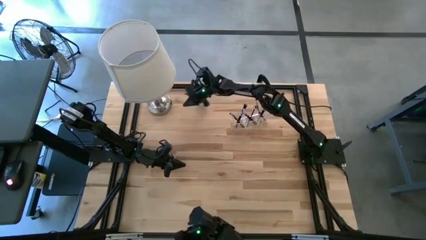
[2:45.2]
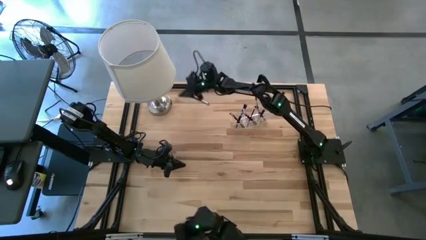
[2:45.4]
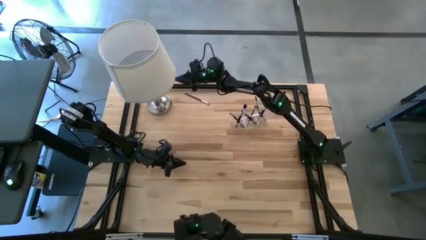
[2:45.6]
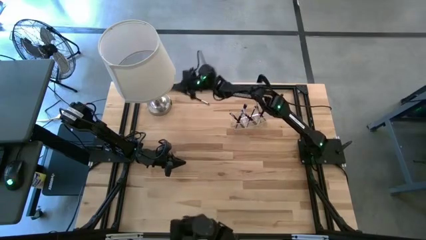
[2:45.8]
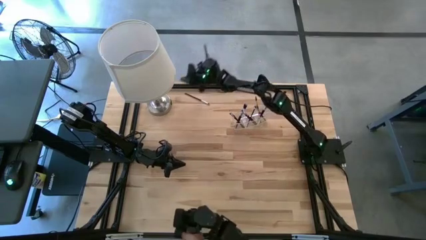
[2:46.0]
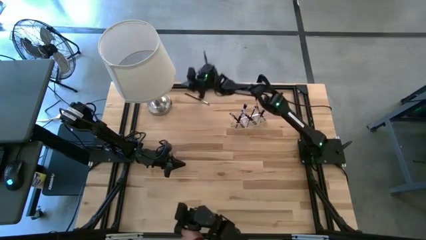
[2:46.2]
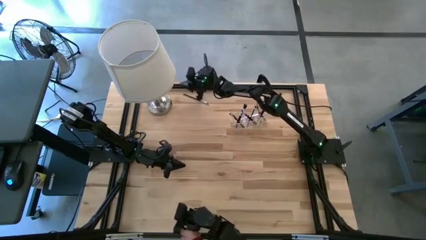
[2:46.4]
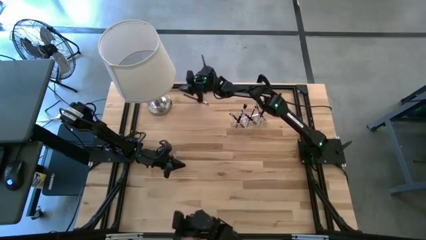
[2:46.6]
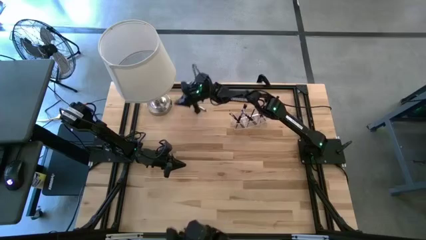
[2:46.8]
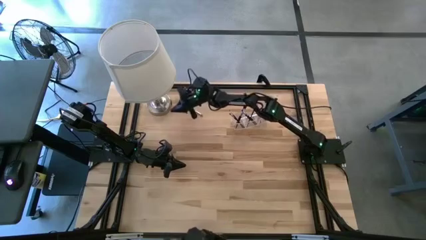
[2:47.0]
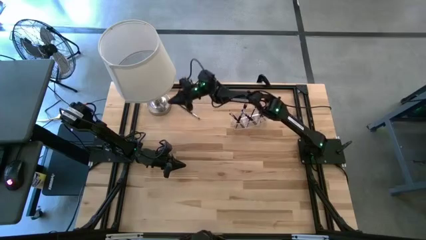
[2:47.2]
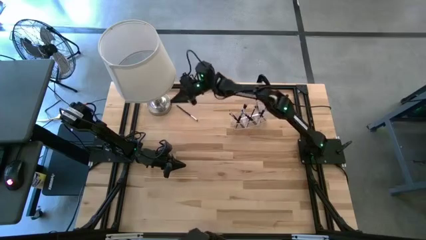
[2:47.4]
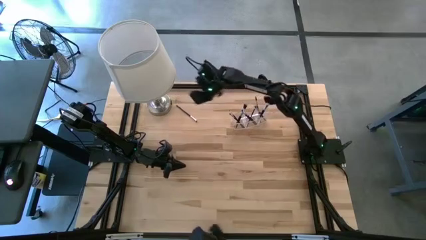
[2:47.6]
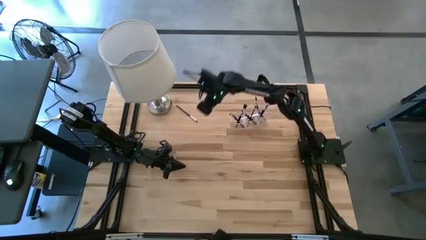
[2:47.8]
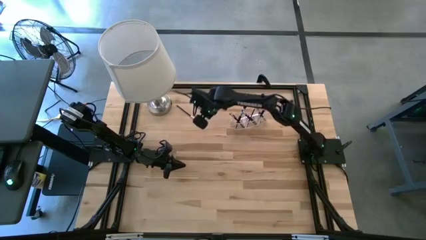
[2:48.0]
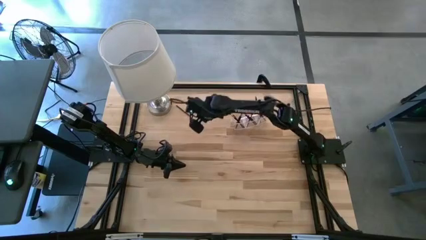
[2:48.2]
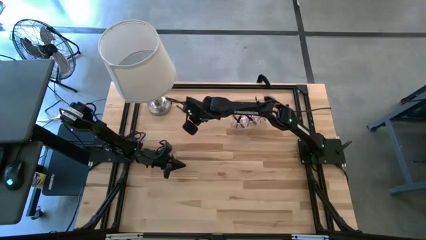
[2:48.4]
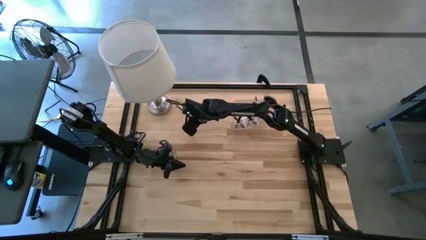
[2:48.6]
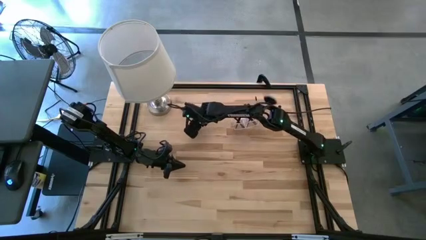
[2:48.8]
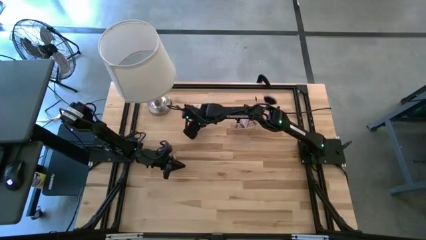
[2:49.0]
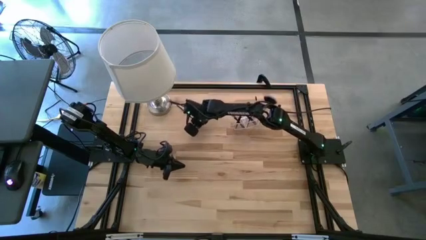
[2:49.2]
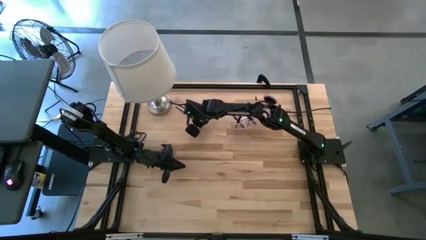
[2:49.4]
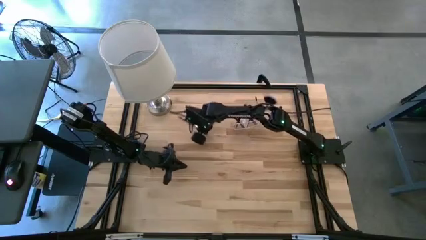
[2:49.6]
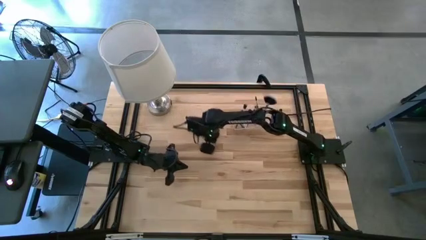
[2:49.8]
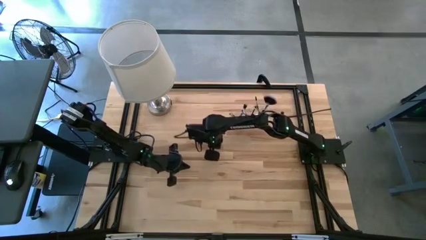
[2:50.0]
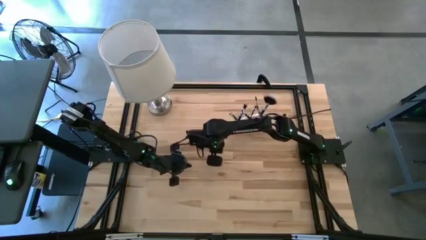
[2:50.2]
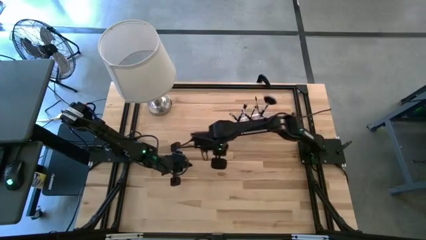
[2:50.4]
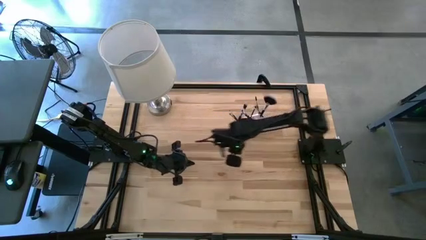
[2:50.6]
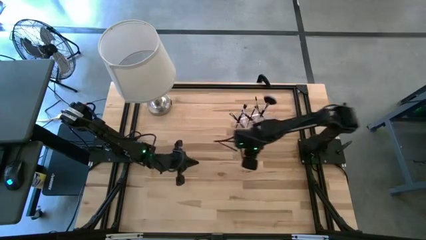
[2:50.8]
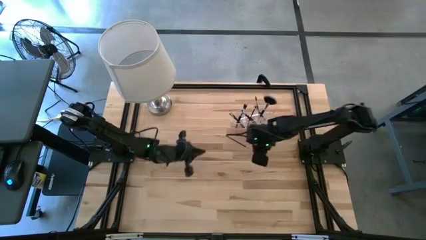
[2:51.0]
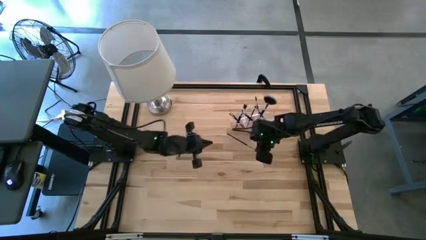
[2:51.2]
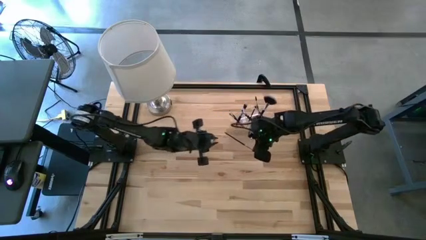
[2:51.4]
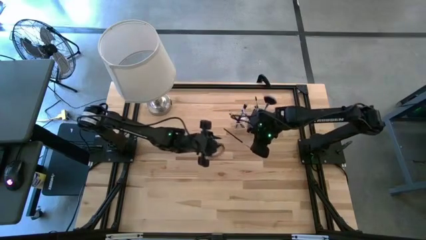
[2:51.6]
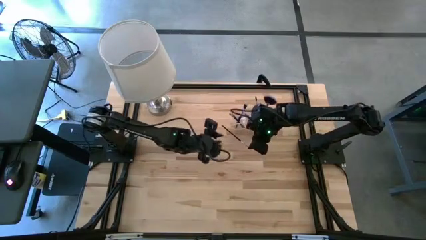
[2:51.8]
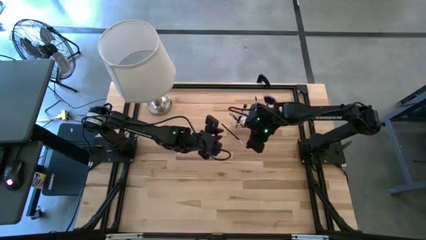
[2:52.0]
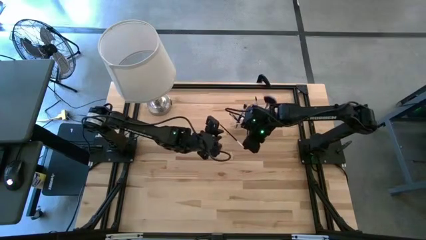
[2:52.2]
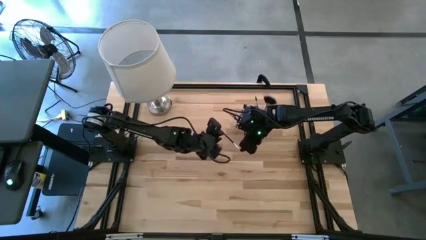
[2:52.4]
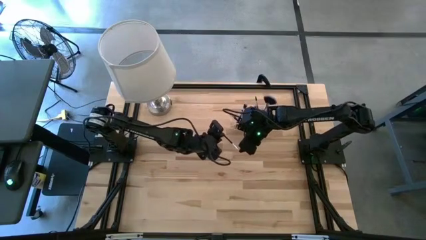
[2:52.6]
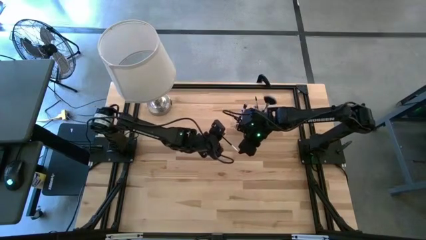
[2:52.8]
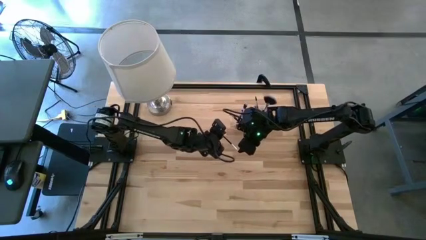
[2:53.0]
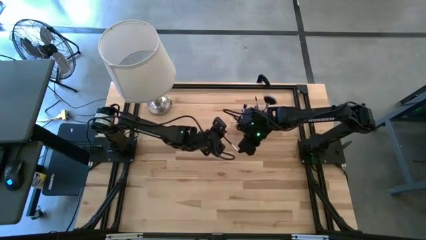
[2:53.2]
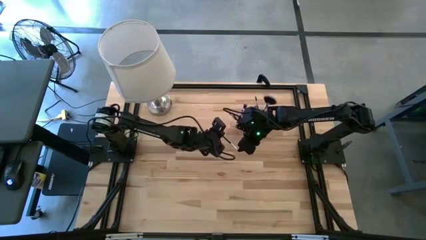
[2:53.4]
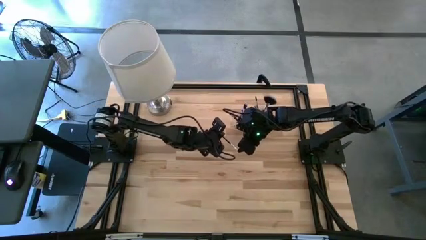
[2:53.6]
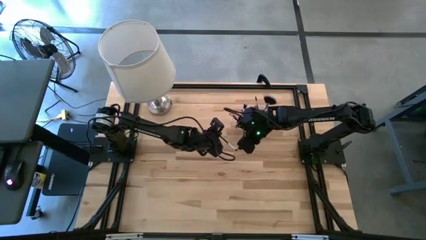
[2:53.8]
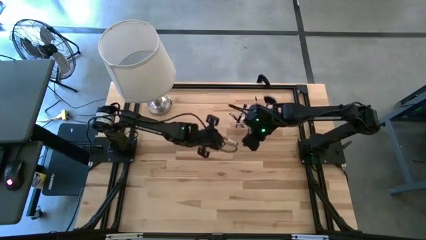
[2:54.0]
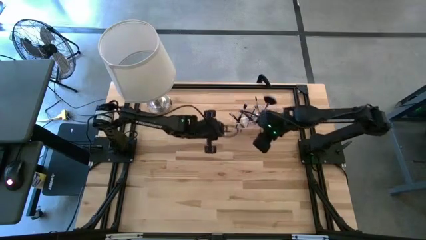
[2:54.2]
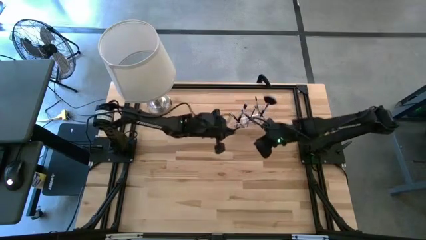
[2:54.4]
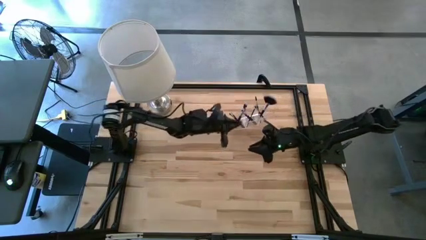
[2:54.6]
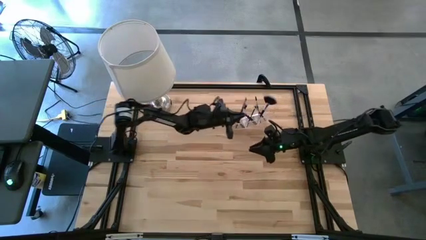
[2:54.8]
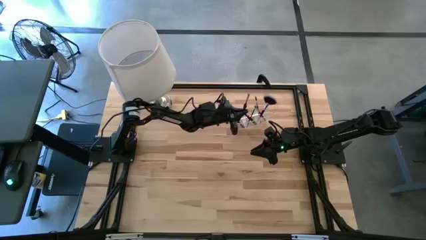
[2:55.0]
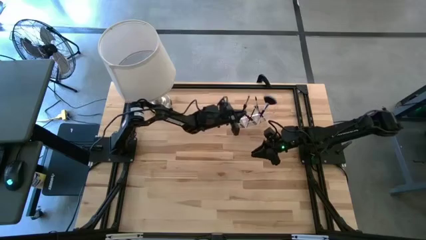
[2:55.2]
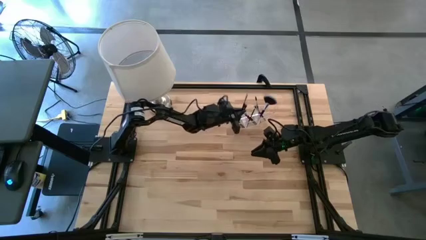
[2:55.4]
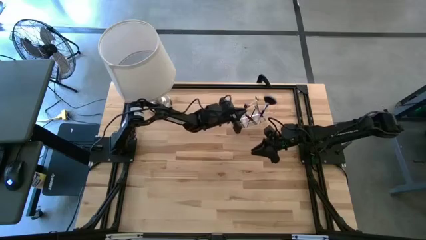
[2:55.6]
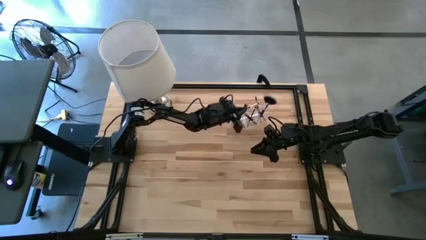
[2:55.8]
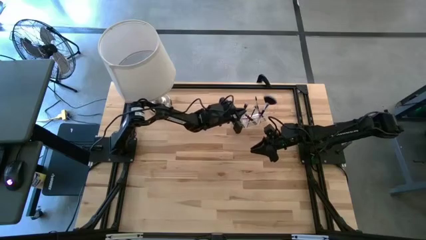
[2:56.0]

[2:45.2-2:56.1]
Task: Put items in baskets/containers
Put the eyeshadow brush into the transparent organizer

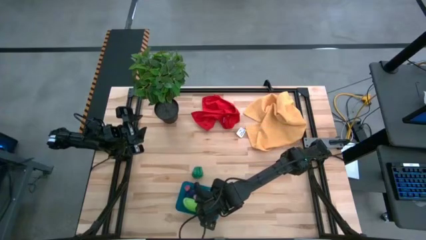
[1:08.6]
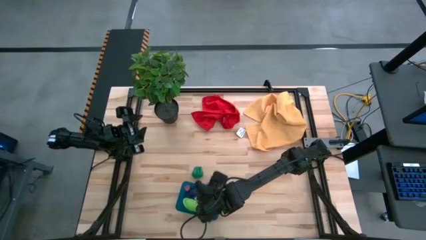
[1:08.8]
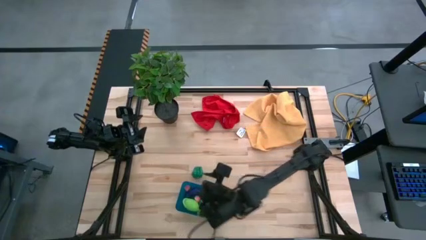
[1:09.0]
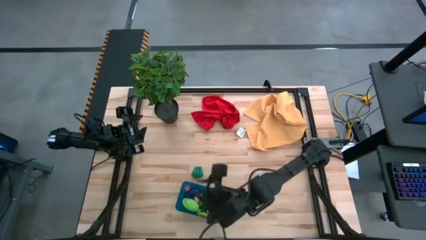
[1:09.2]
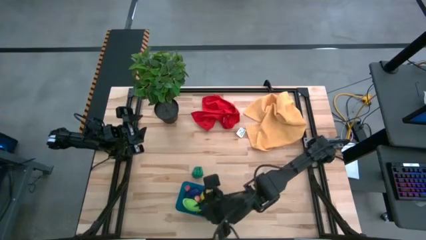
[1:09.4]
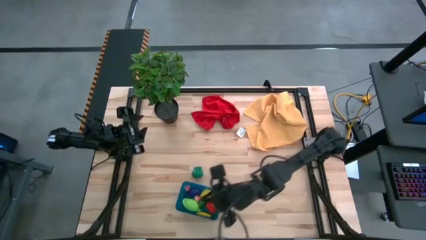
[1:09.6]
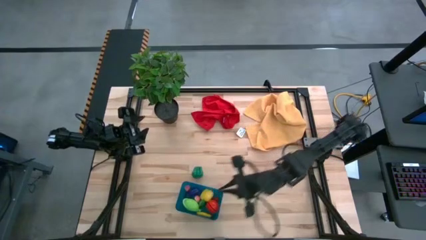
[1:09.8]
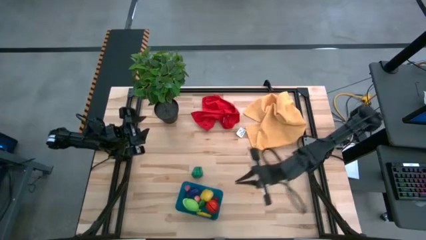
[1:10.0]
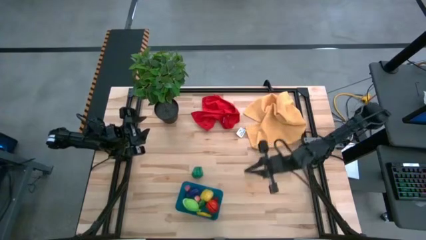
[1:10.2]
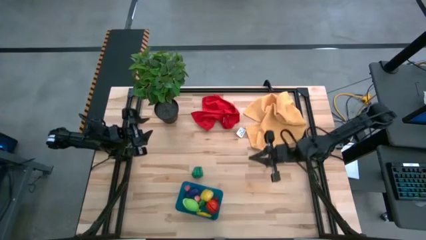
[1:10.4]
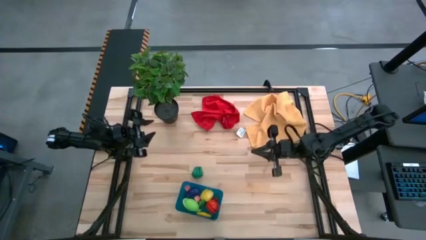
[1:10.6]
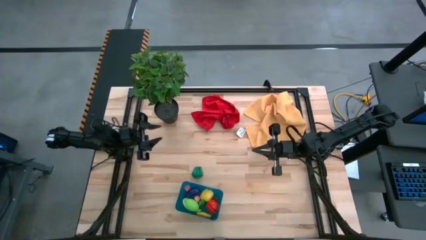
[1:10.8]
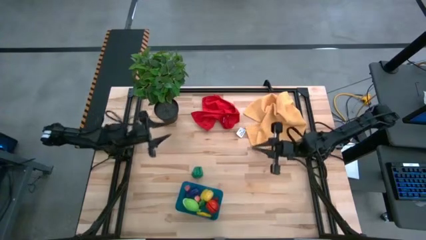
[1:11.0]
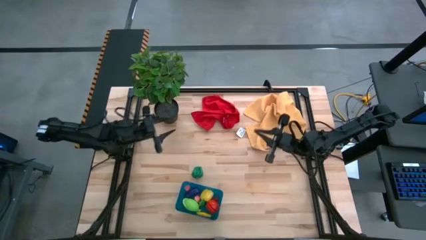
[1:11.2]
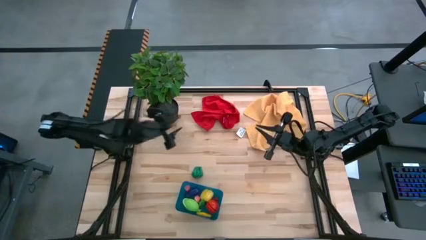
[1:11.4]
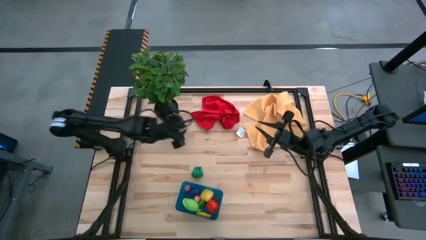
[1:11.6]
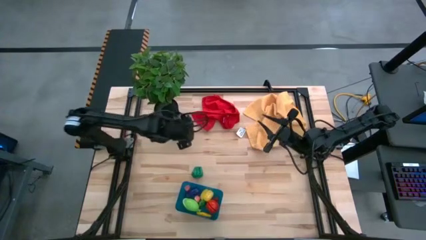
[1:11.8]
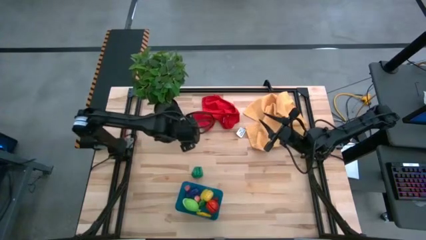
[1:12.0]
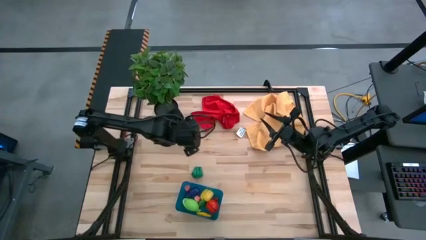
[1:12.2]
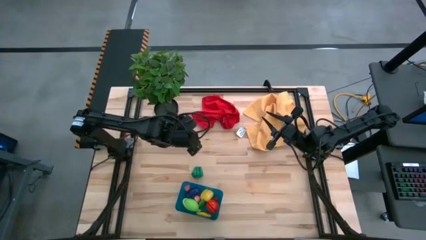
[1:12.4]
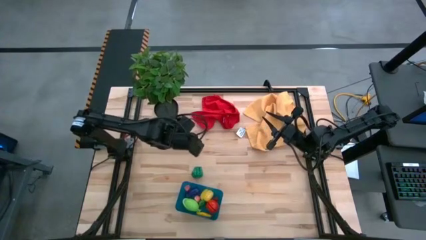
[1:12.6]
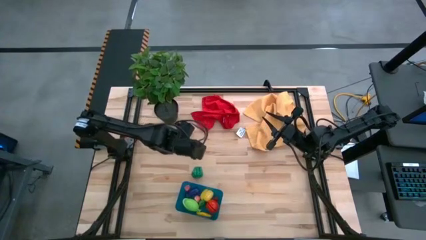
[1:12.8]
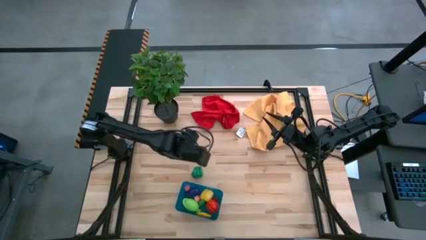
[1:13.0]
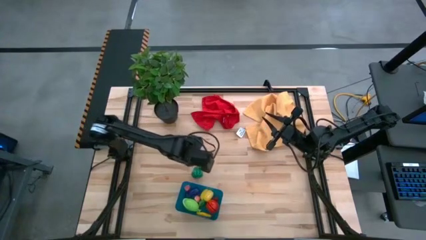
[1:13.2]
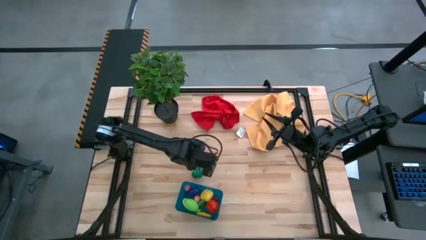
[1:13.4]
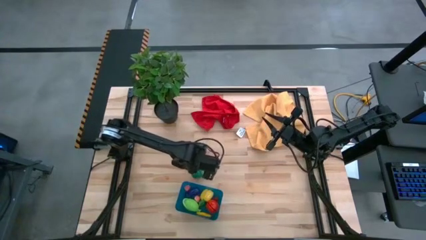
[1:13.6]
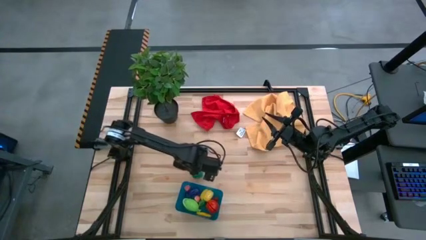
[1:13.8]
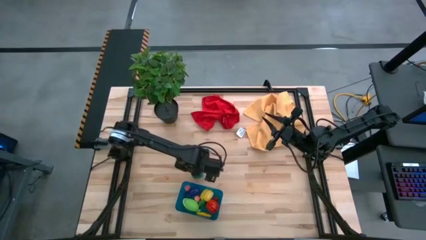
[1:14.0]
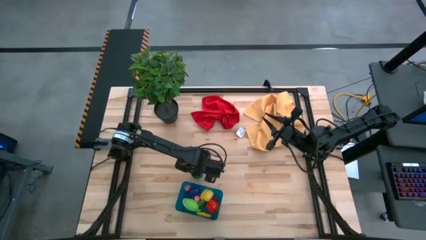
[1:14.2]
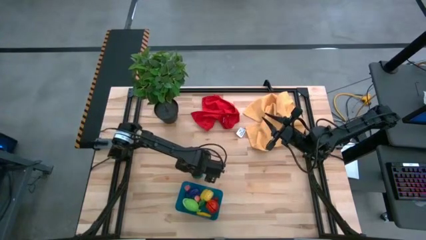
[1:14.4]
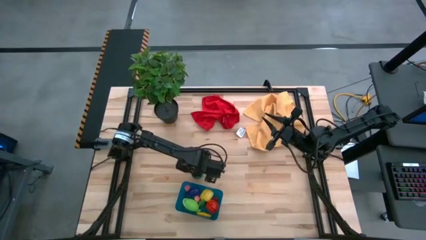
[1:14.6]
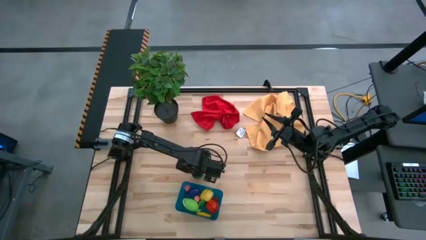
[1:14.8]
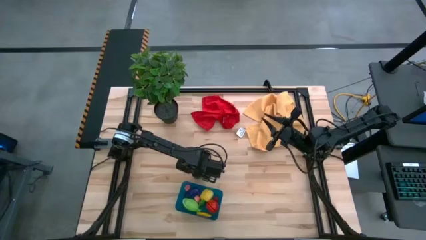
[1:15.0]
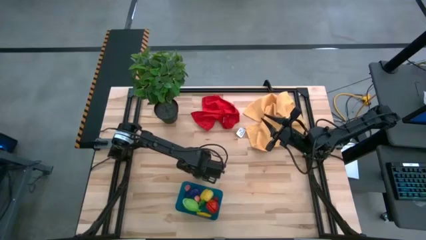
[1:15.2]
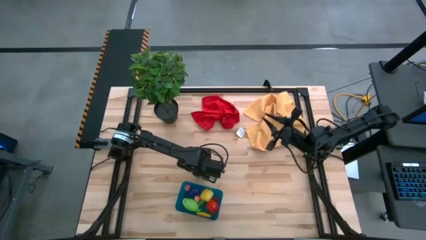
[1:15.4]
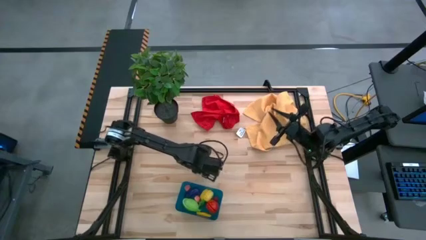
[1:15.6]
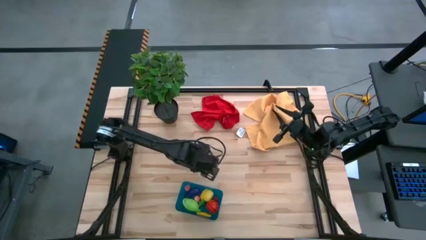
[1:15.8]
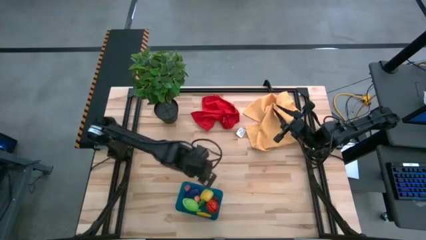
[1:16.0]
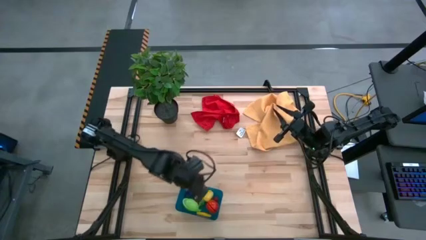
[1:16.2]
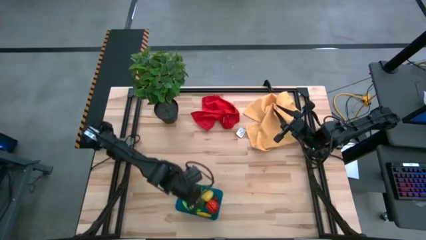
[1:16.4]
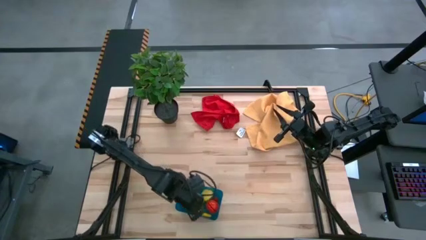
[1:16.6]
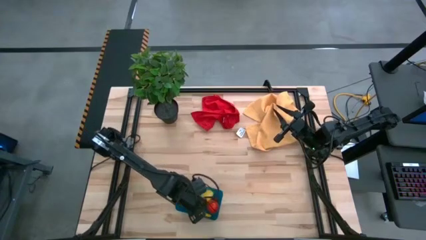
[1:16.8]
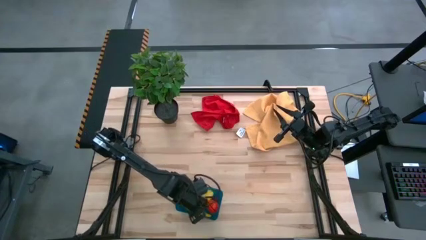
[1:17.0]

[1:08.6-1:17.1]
Task: Pick and placing Produce into tupperware
Put the green bell pepper into the blue basket
